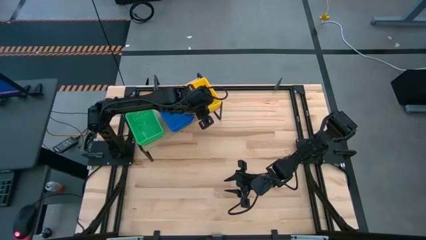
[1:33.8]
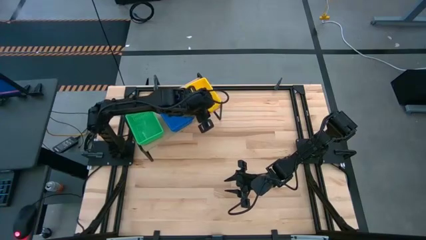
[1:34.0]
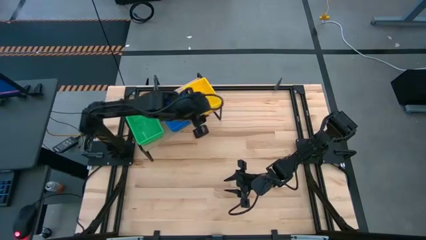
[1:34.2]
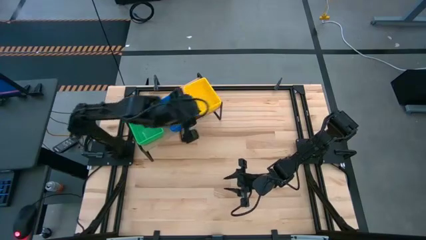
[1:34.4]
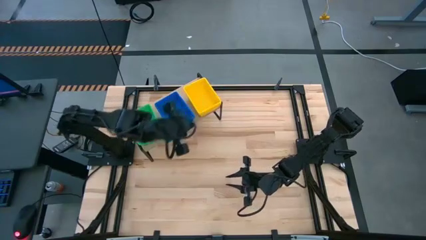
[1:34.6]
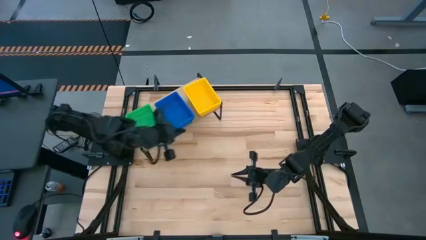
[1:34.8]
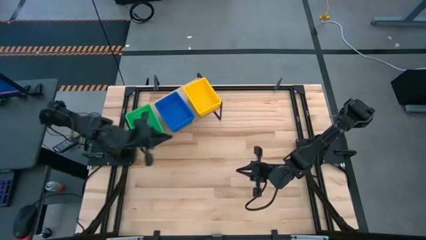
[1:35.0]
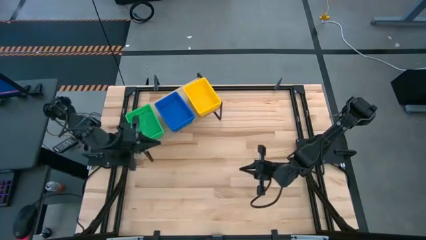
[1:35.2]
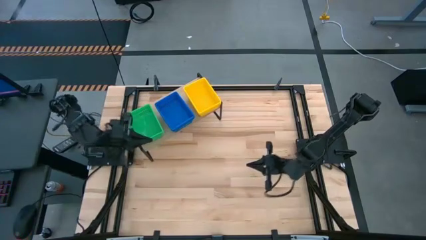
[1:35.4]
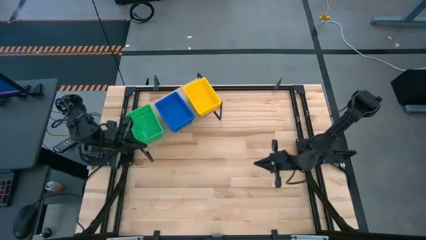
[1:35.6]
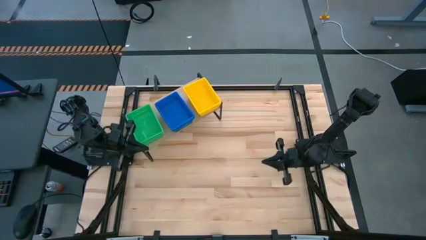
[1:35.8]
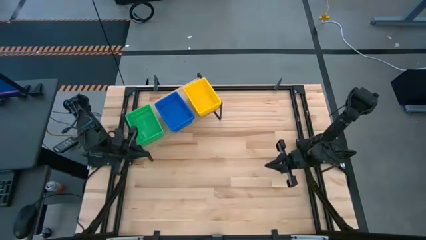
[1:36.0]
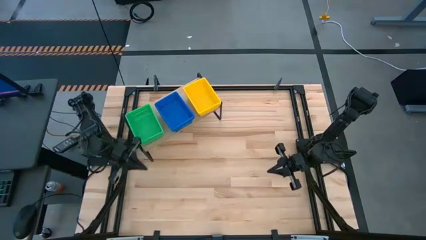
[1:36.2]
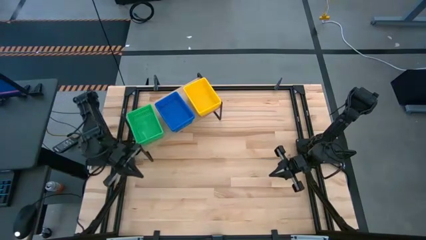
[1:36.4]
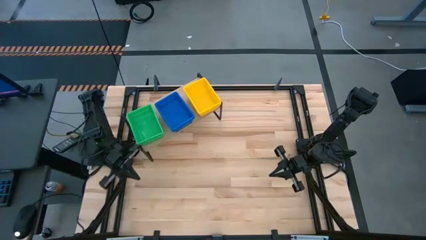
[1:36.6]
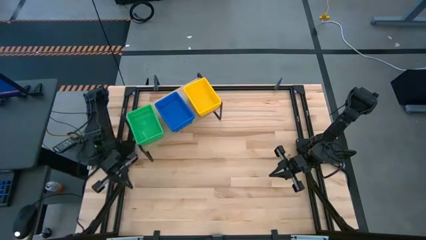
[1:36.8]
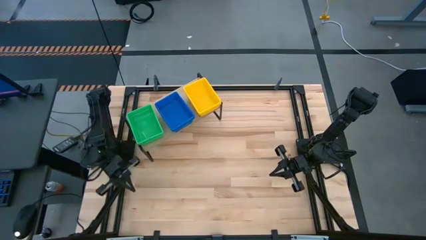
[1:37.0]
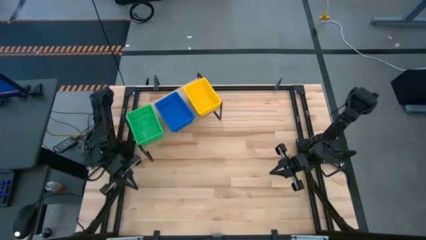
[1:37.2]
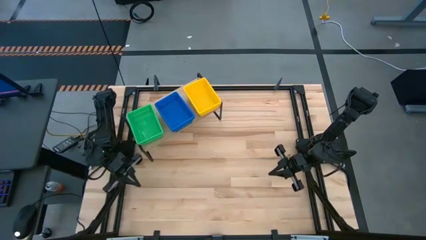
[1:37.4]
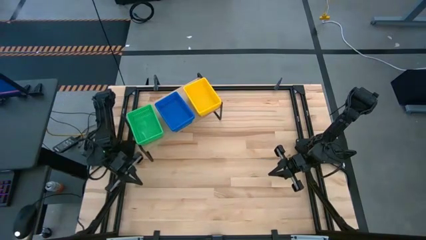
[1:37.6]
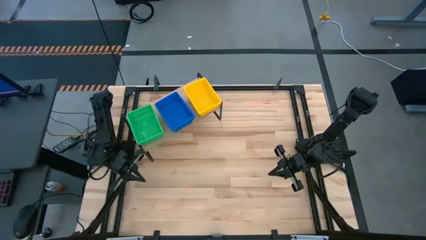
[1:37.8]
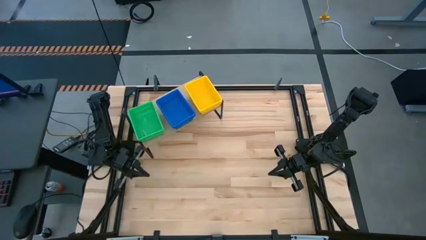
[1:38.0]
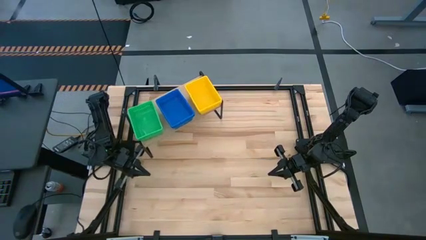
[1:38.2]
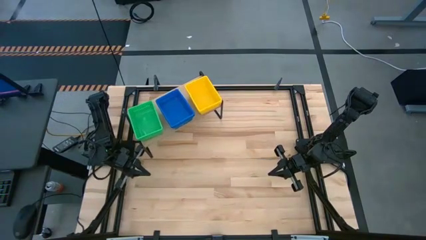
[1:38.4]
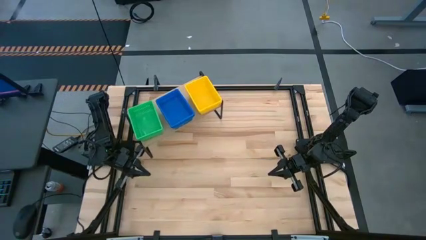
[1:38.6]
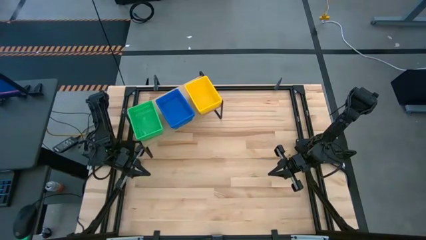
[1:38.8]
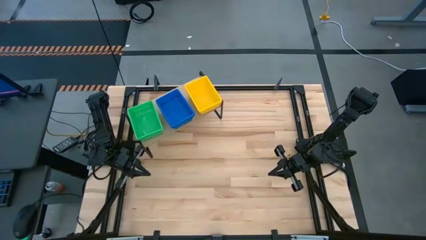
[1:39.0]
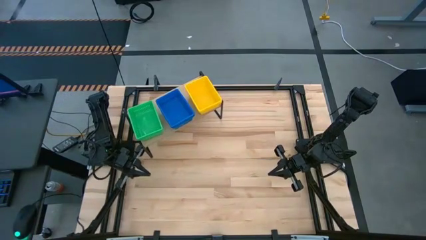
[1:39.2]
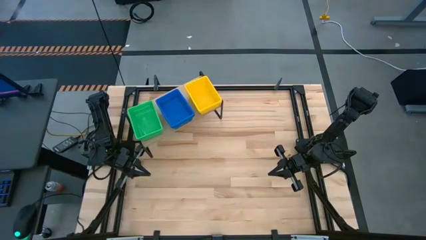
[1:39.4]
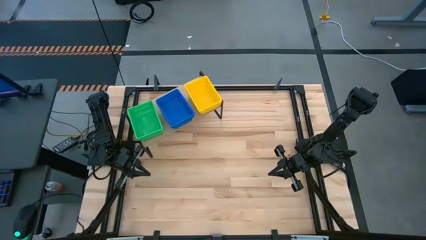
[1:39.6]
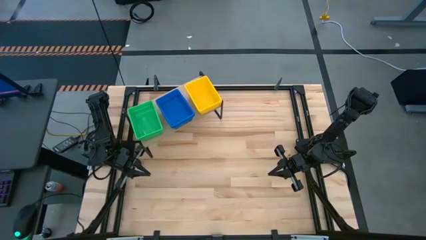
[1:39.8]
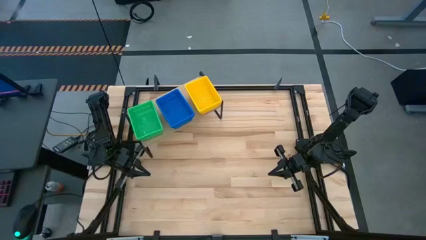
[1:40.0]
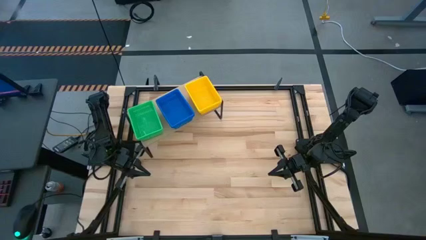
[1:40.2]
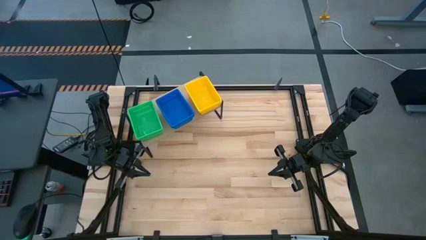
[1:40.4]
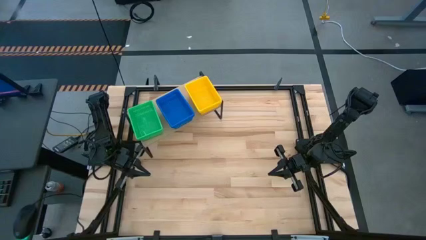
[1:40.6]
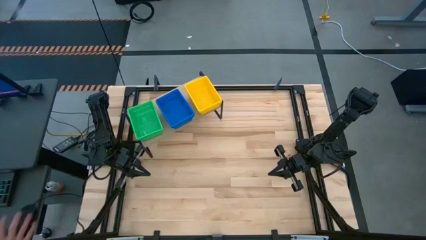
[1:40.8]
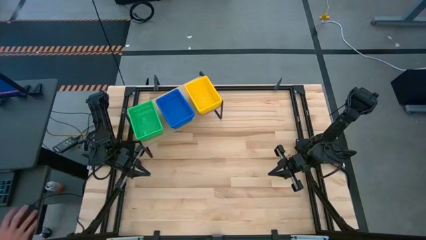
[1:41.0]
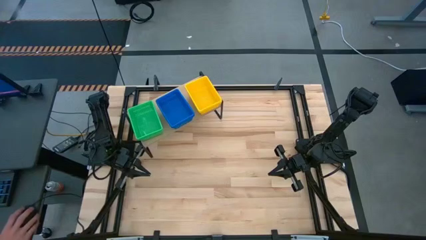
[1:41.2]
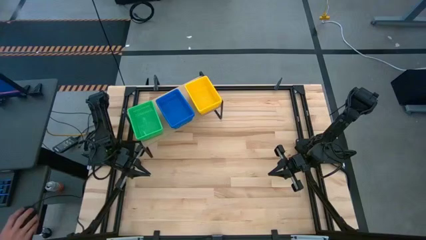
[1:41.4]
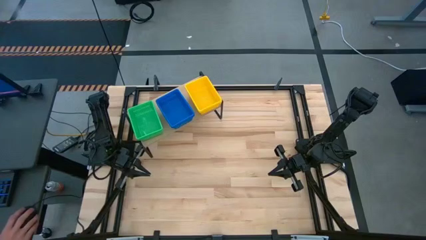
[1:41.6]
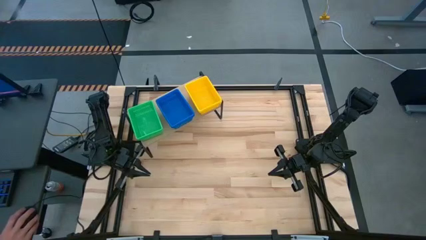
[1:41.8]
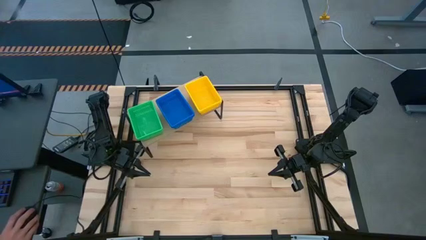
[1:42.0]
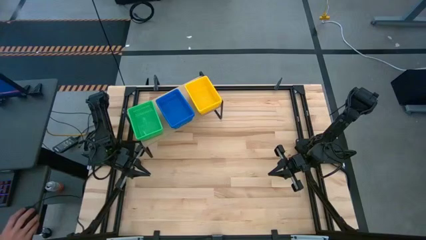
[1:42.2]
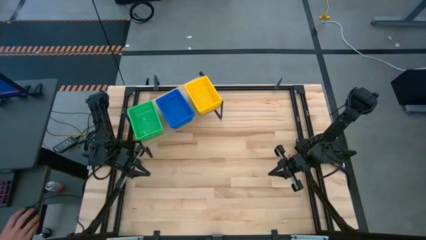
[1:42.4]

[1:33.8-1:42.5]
Task: Stack baskets on shelf by color
Return to Home Position
